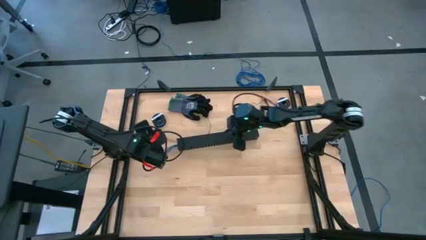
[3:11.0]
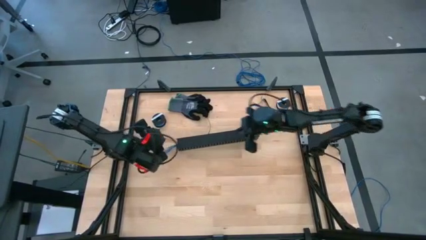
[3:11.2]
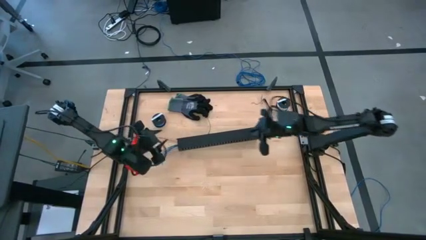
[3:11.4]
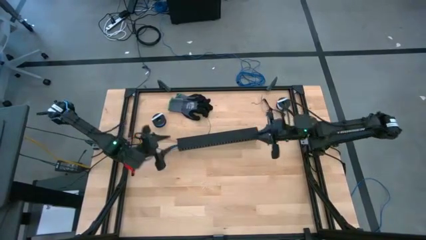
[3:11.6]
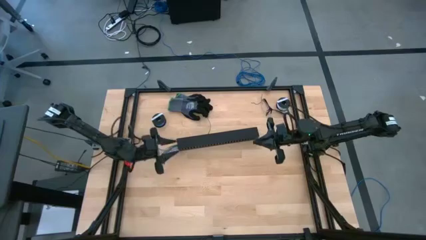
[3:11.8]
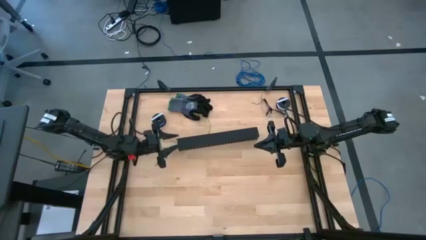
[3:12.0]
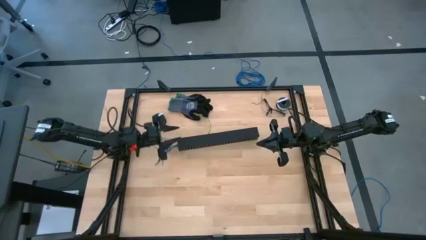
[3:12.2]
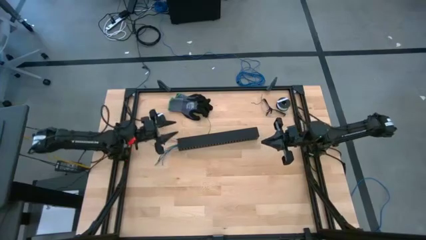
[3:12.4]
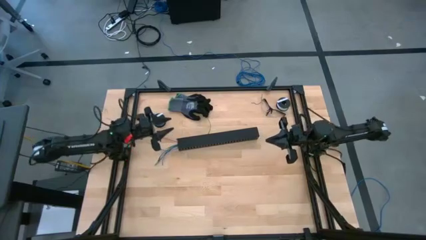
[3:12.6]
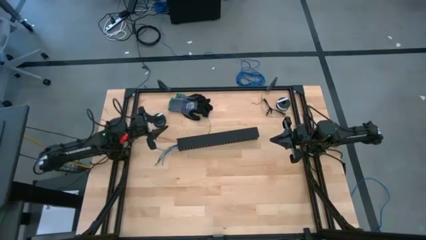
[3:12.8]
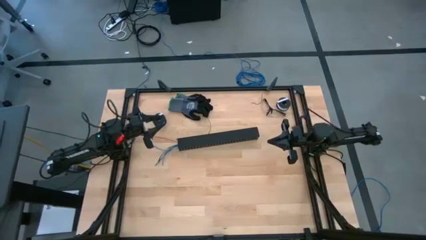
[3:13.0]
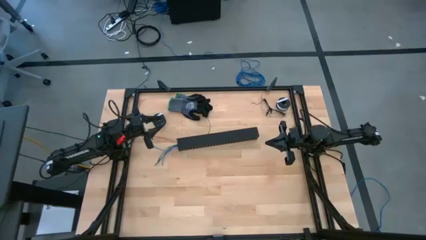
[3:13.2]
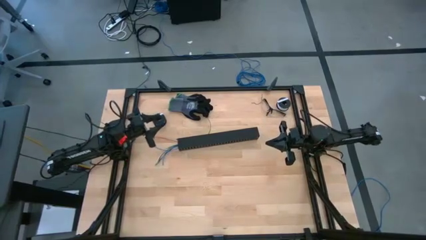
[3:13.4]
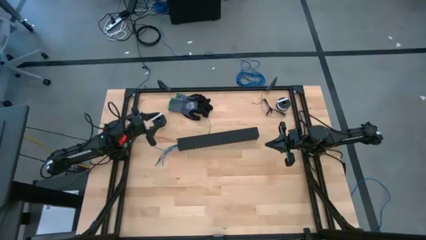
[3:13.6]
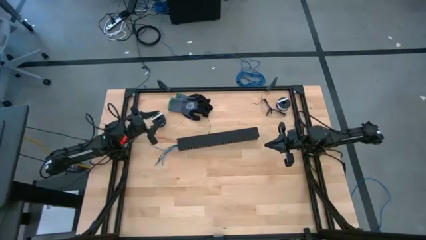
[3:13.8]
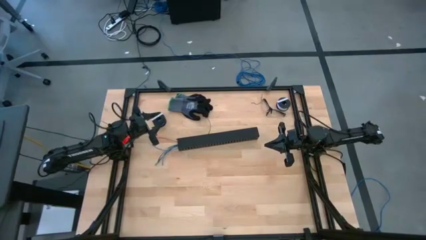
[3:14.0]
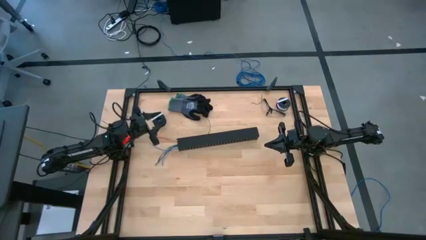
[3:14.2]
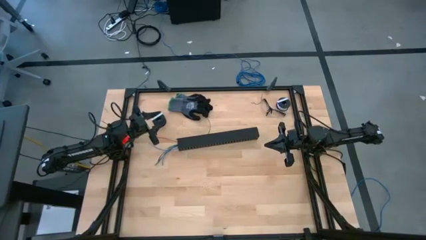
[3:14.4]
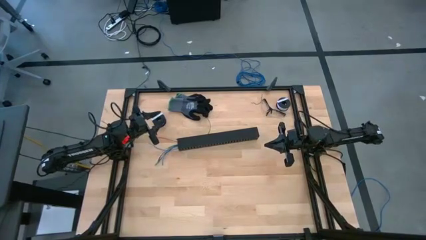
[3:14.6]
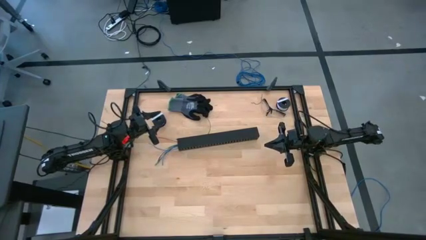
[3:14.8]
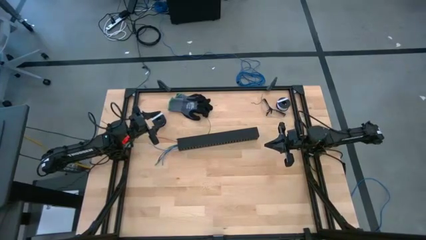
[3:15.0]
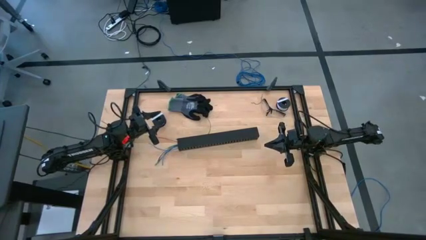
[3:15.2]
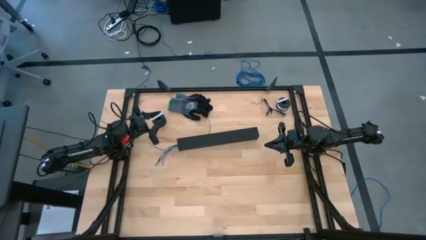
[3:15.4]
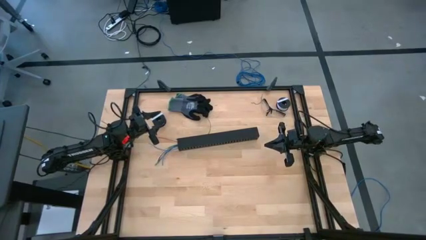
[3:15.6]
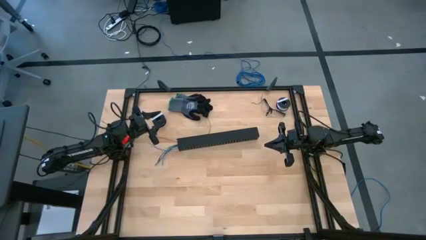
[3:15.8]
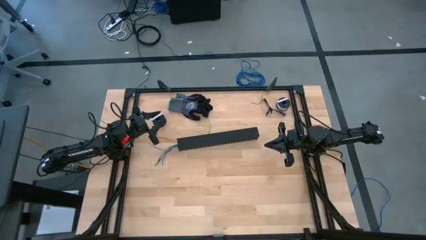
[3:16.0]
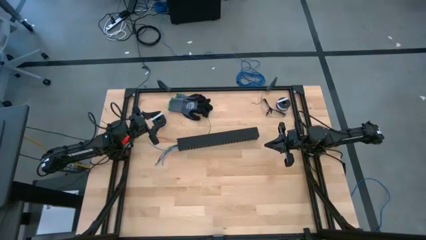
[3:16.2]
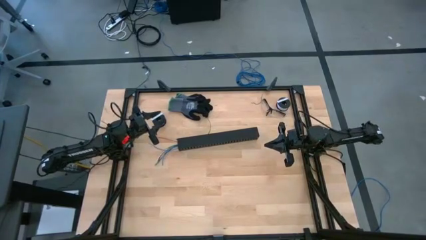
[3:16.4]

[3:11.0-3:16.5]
Task: Ziptie cables
Return to Home Position

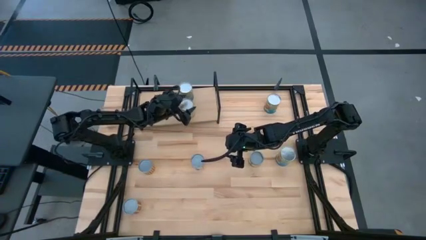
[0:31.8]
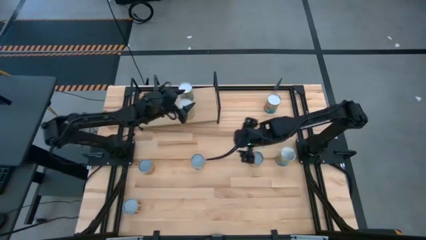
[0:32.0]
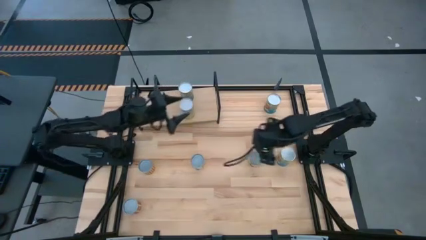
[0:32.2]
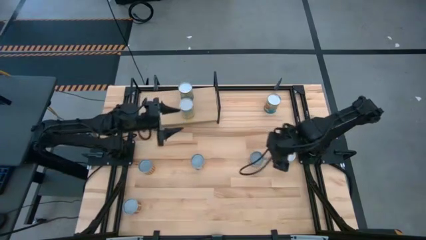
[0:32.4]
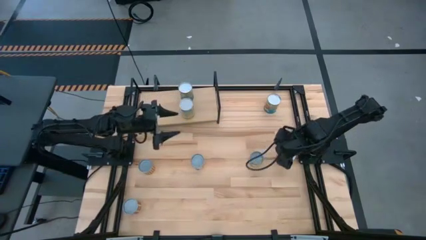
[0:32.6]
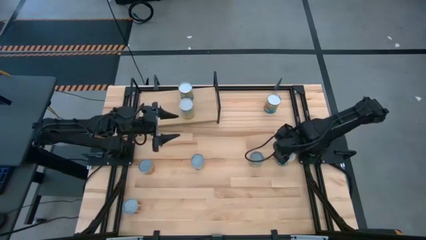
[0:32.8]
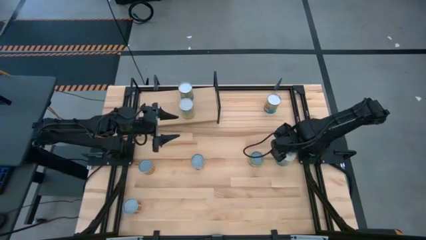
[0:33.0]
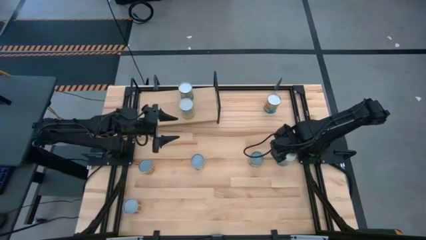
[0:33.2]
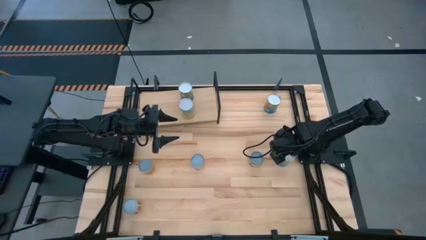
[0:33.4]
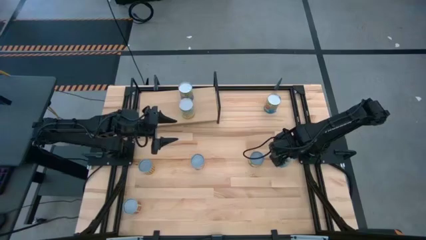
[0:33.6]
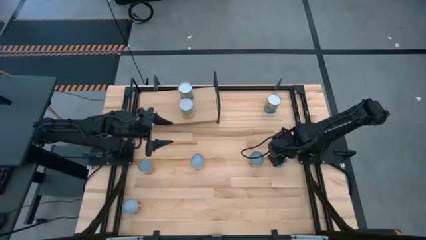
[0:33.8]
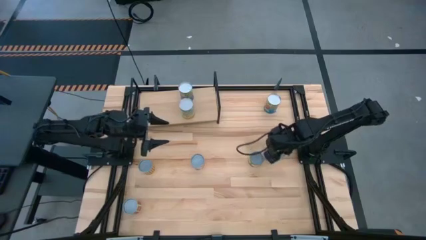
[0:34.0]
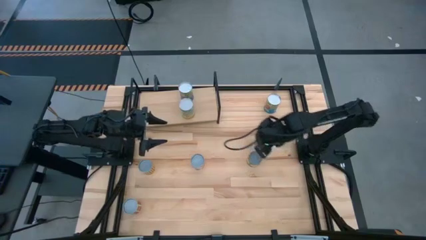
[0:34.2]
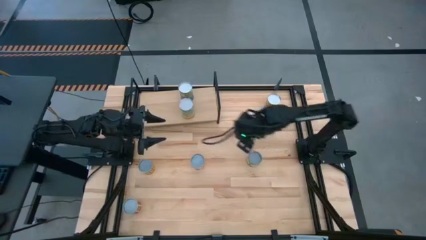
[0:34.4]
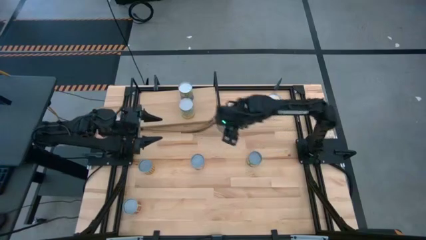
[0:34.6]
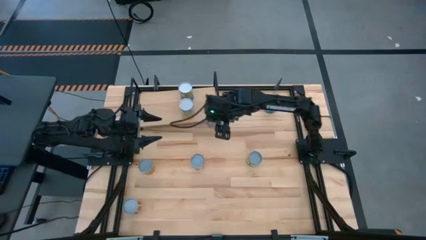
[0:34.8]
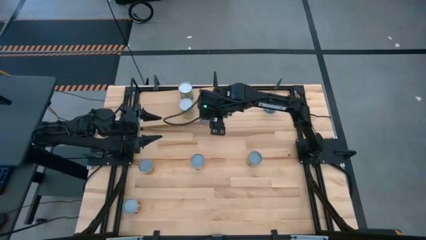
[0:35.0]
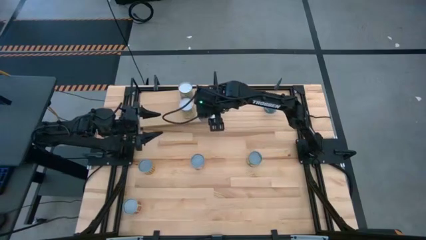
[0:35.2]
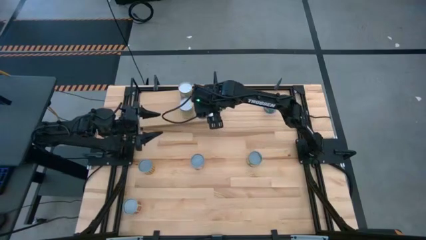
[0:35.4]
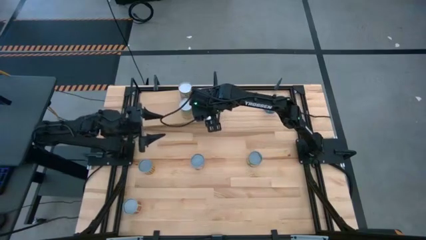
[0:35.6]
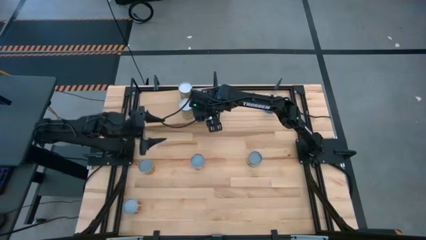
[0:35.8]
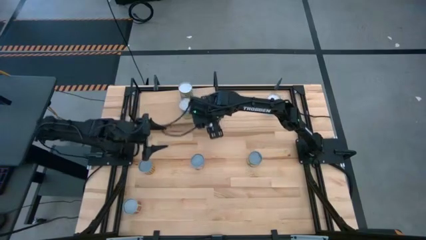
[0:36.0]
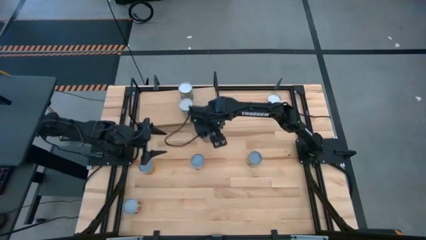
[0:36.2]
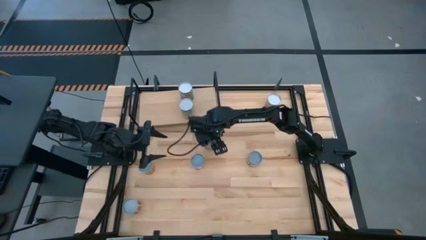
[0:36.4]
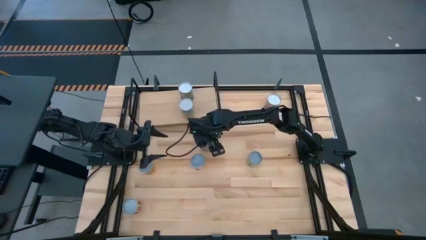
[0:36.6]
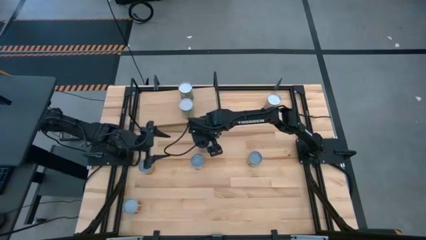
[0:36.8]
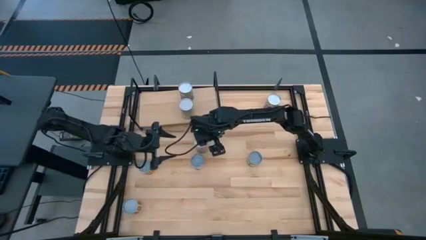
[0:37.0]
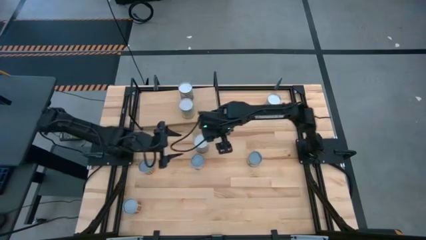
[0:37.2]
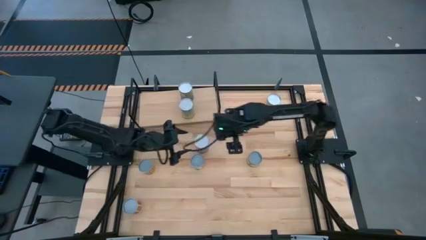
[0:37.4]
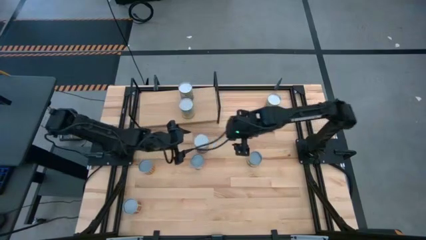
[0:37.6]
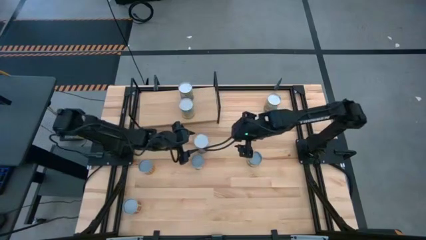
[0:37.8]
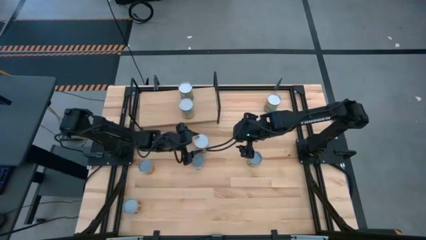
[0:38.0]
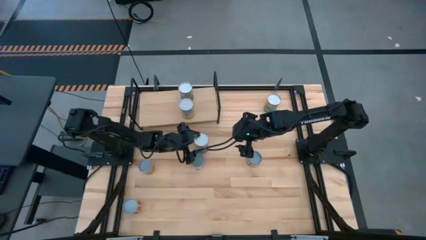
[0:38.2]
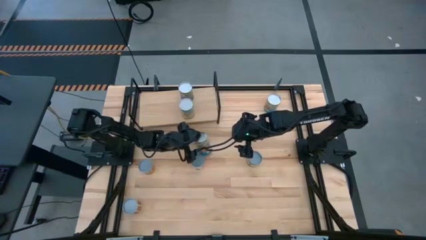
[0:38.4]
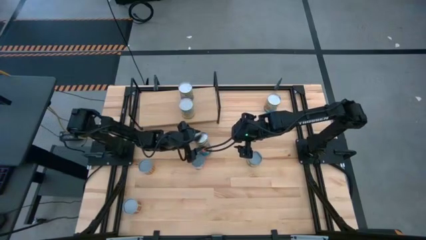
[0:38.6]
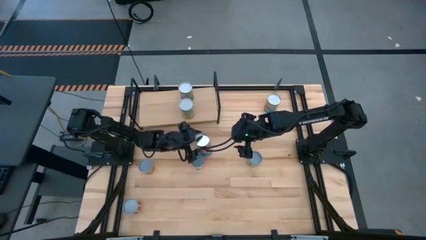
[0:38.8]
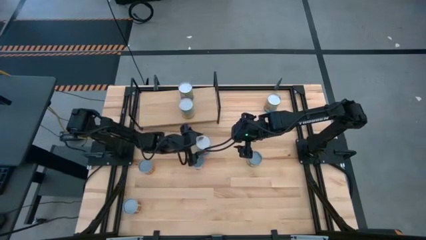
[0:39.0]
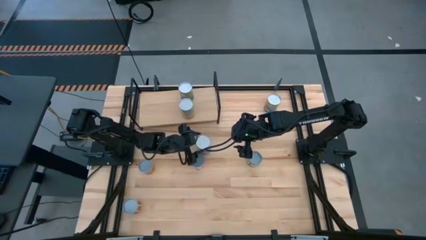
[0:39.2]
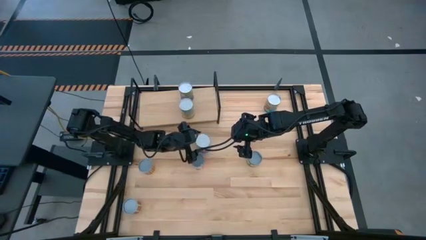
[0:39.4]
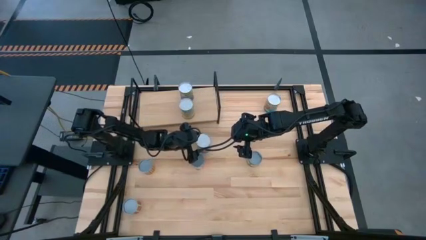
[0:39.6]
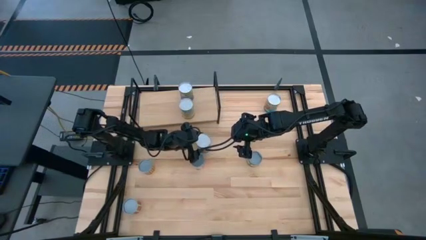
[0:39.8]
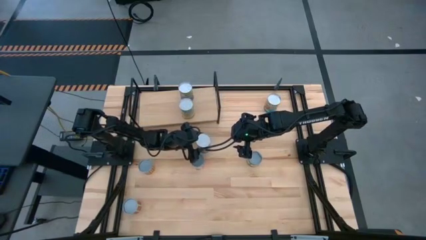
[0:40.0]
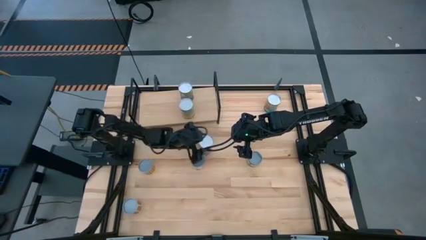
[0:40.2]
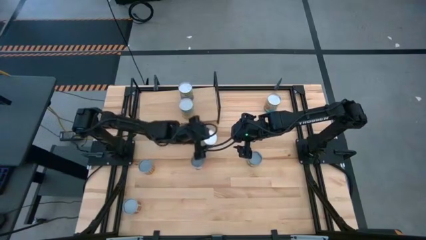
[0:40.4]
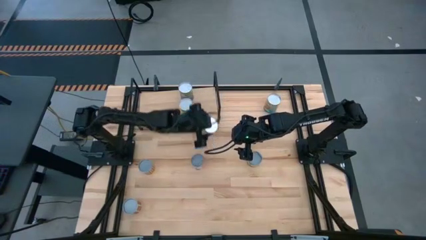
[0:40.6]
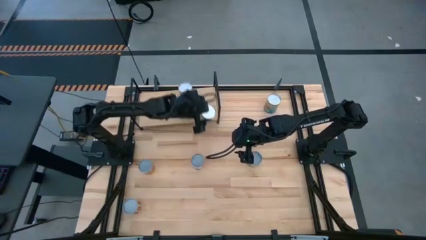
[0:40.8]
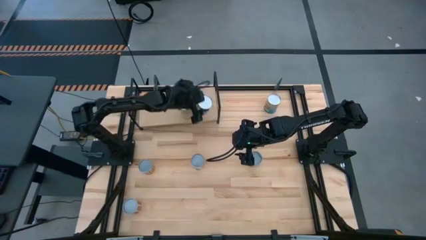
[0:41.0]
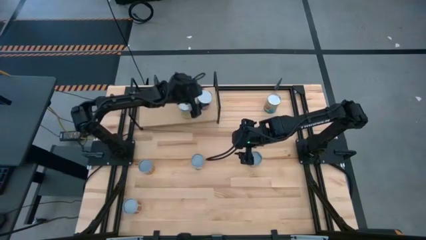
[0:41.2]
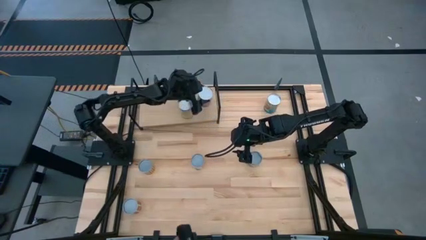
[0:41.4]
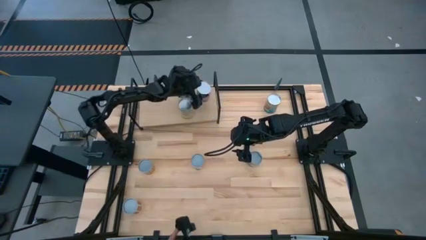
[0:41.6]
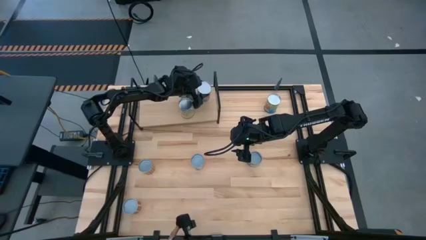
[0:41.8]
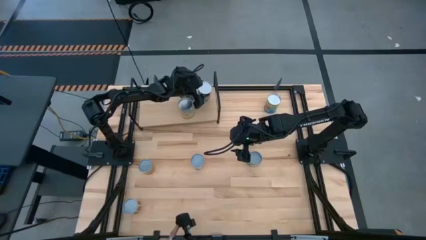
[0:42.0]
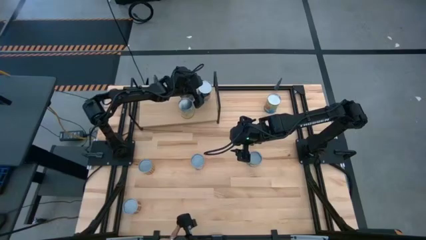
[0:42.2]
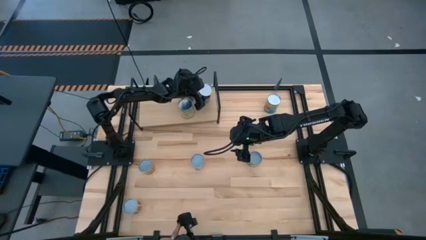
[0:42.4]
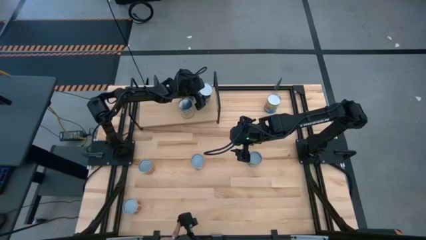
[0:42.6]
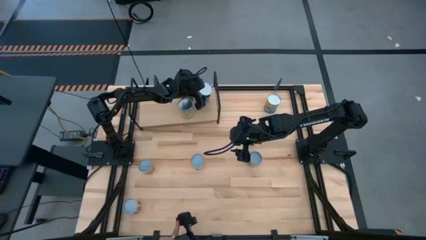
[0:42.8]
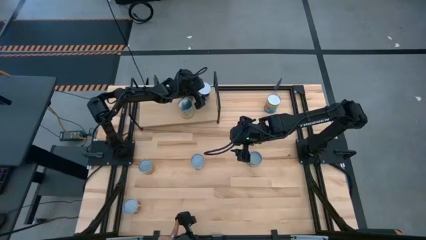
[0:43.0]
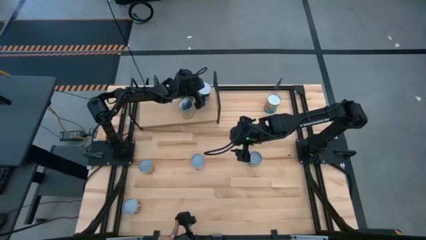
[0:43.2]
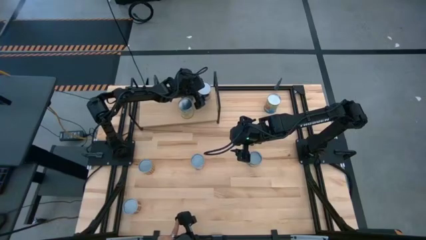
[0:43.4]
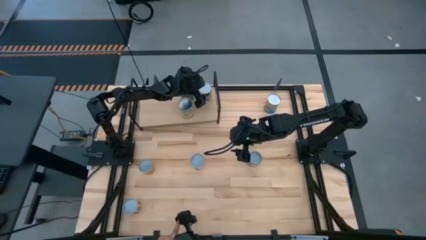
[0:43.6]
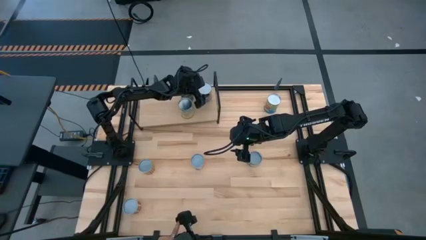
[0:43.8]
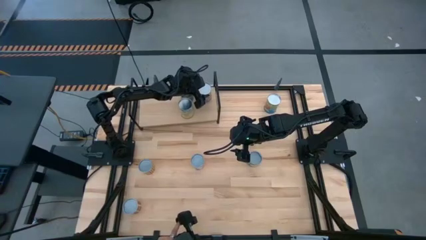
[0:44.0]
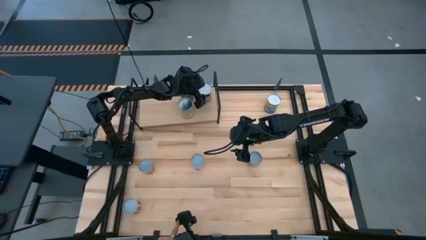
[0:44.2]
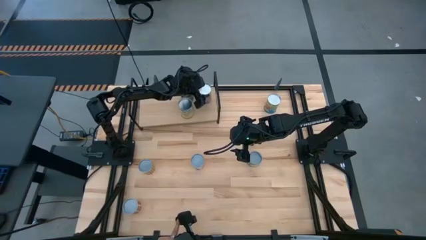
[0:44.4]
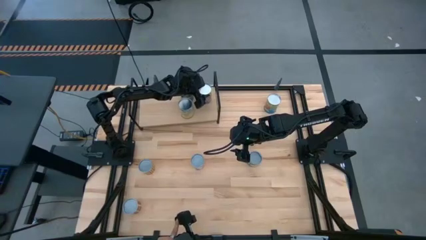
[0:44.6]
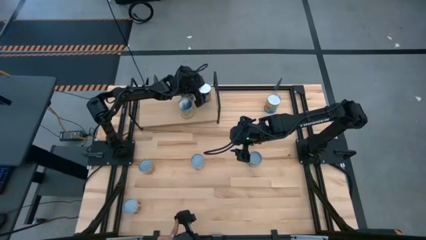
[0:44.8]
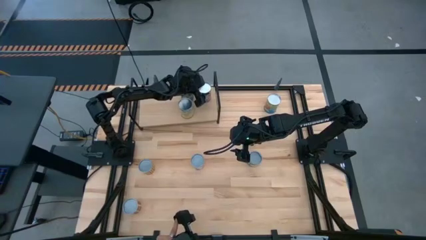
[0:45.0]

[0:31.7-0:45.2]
Task: Pick and place cans onto a shelf
Put the bottom canned tomatoes on the shelf
